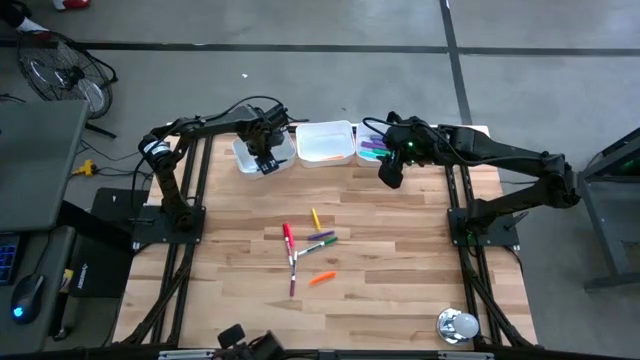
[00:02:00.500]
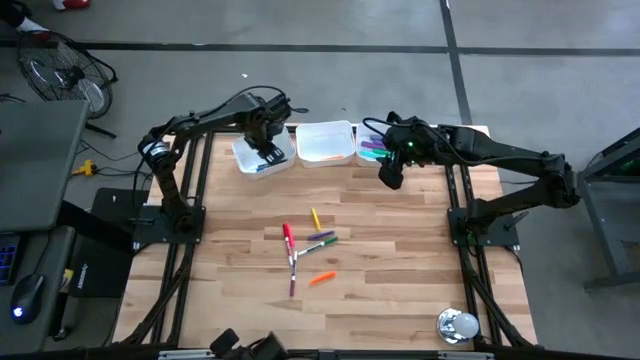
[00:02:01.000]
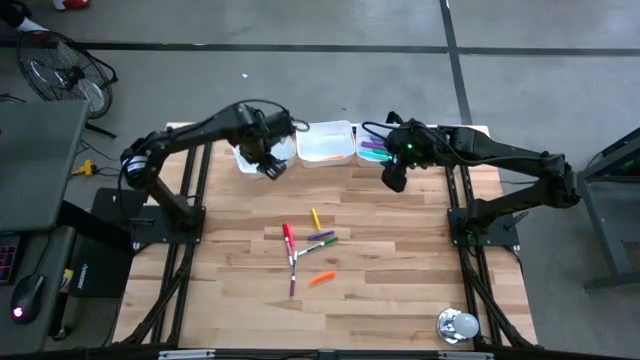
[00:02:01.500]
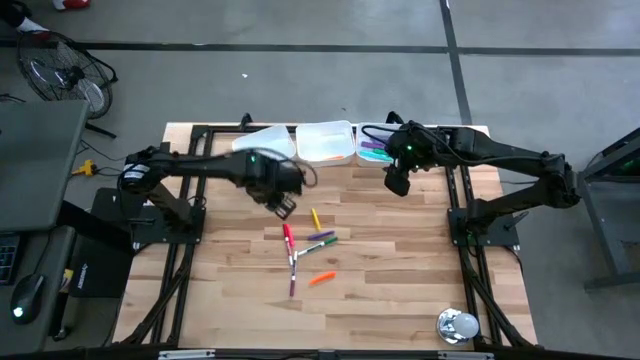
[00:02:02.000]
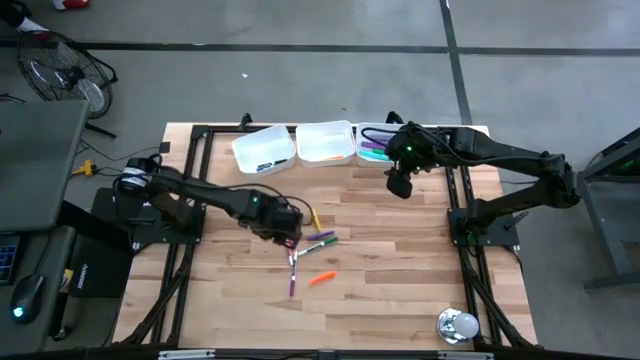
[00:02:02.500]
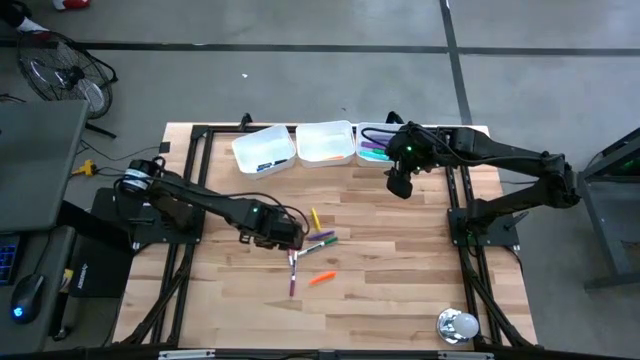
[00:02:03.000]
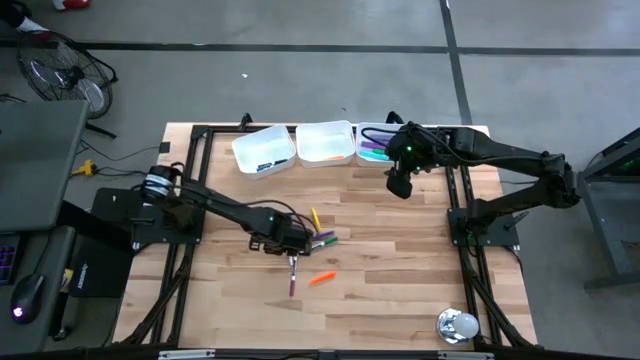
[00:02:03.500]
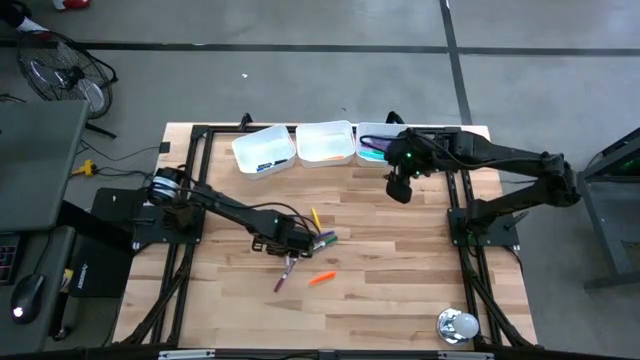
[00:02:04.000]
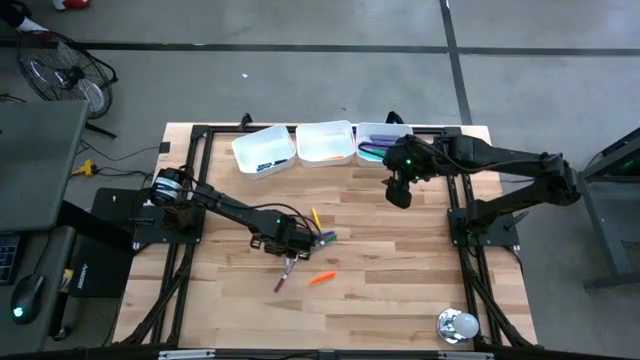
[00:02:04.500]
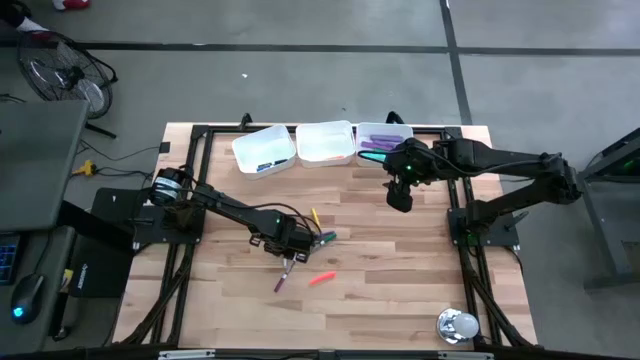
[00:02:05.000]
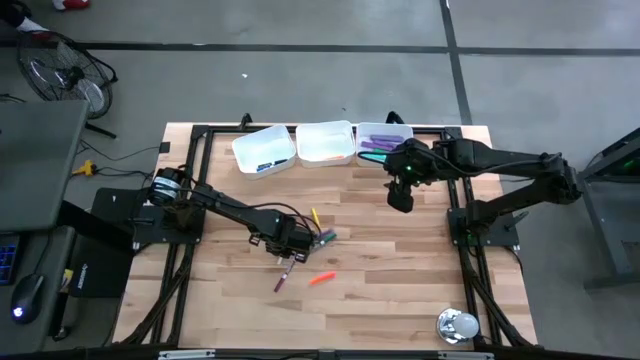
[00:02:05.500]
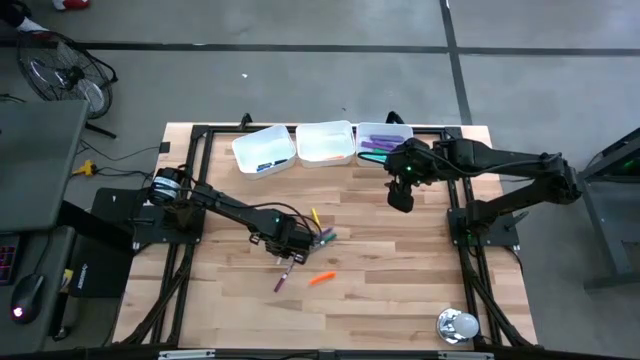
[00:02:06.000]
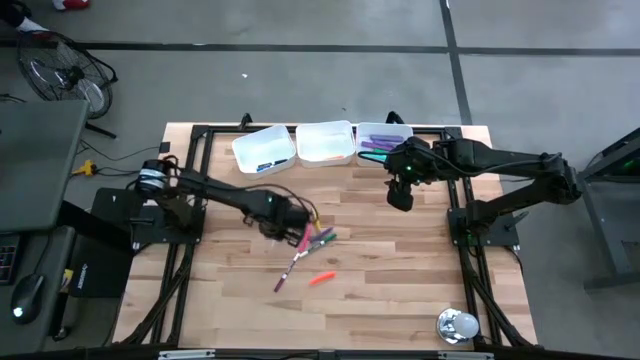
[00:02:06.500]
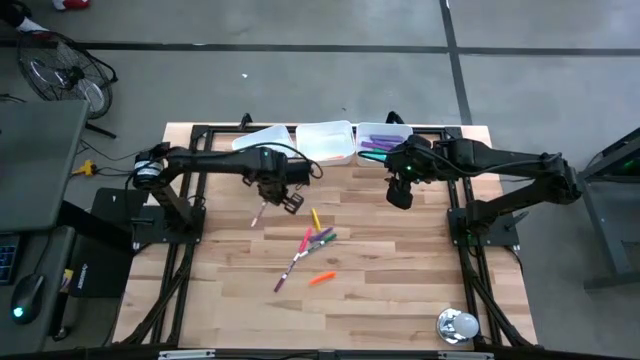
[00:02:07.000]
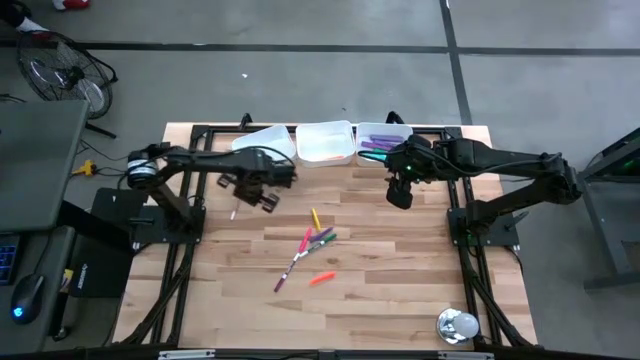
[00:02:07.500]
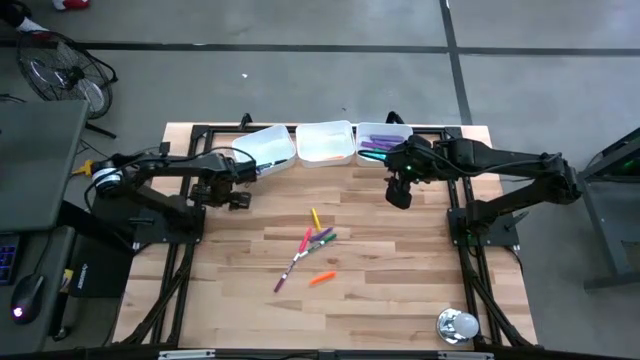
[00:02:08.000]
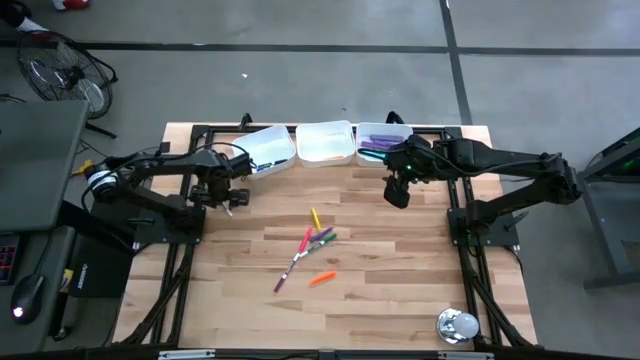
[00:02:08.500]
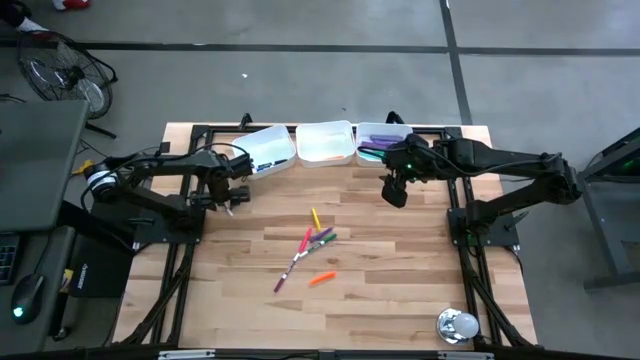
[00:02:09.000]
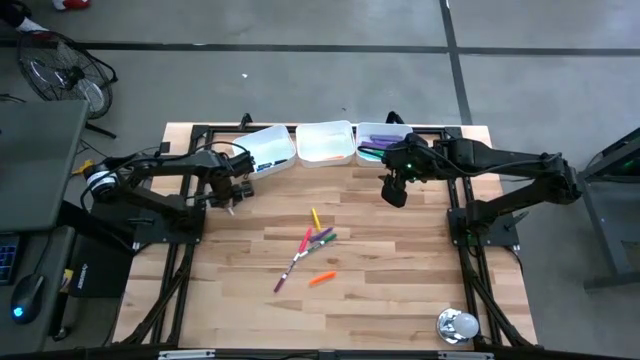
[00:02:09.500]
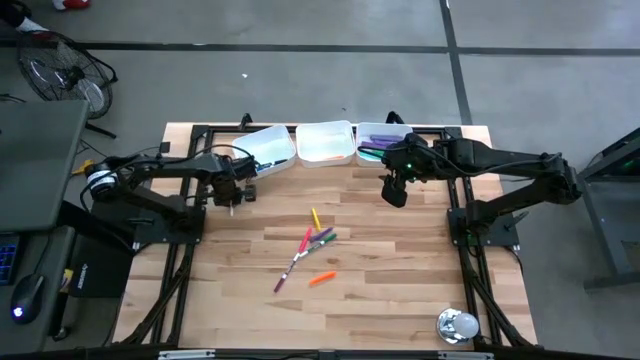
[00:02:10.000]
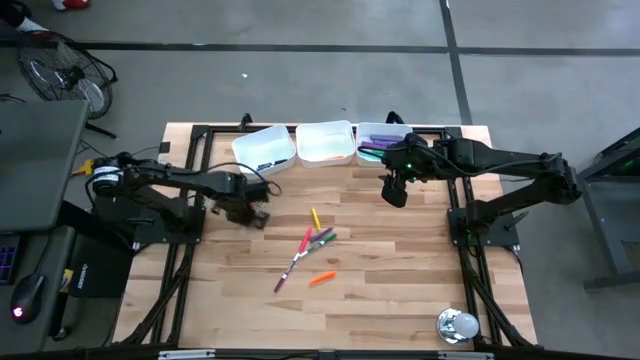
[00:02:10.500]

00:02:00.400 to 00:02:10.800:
Task: Pick & Place Markers
Put the red marker pen into the left white bin

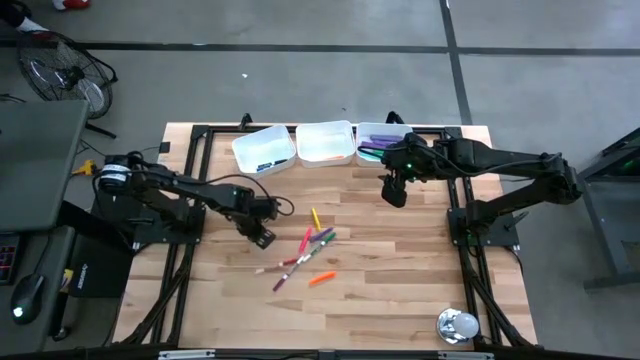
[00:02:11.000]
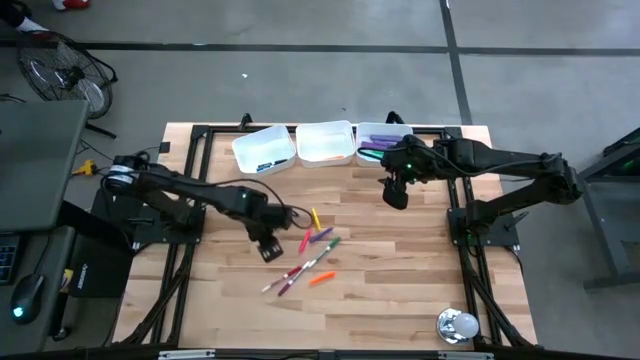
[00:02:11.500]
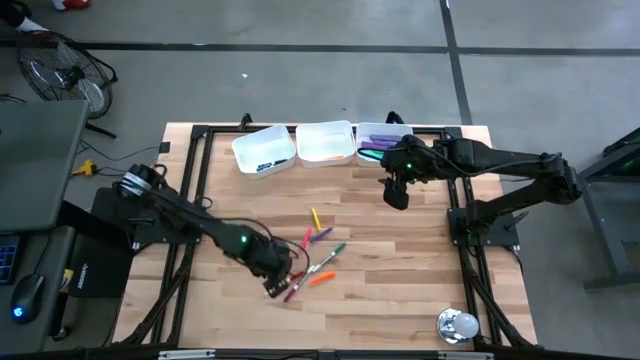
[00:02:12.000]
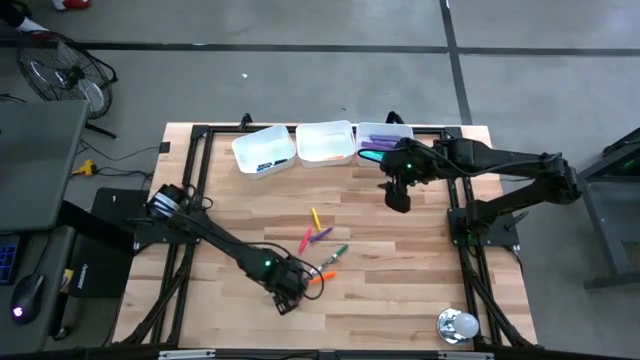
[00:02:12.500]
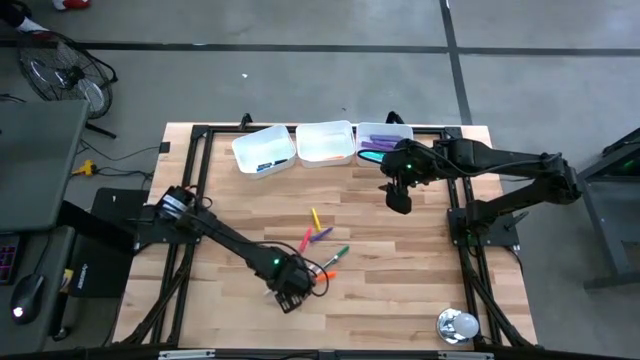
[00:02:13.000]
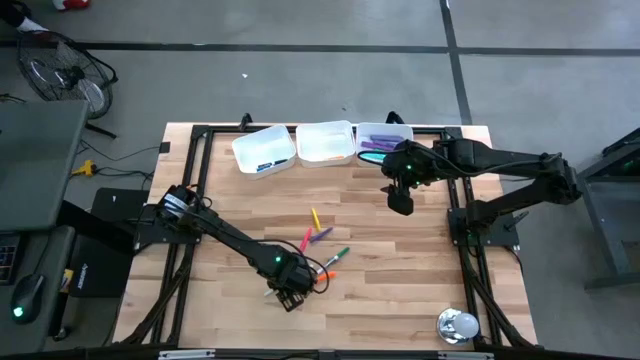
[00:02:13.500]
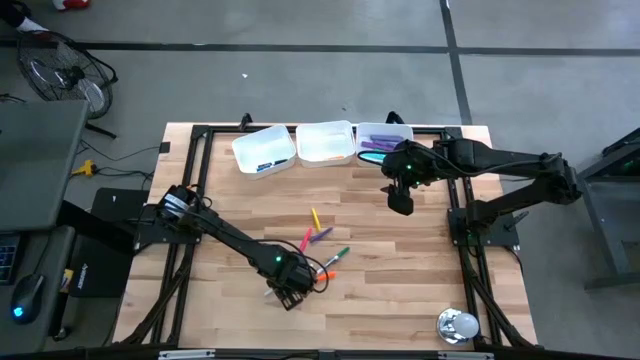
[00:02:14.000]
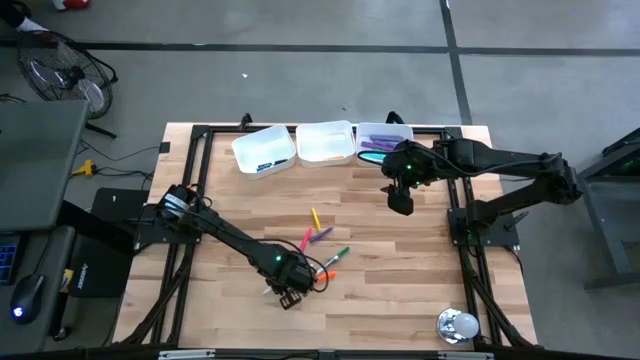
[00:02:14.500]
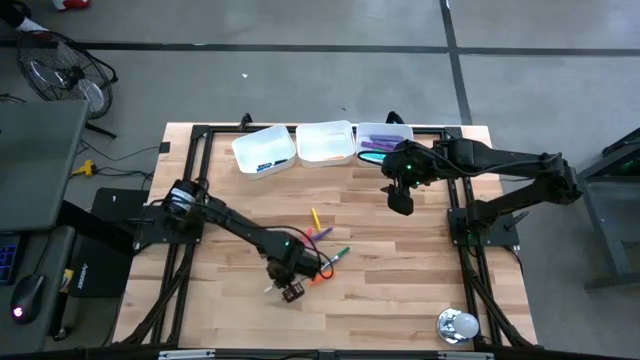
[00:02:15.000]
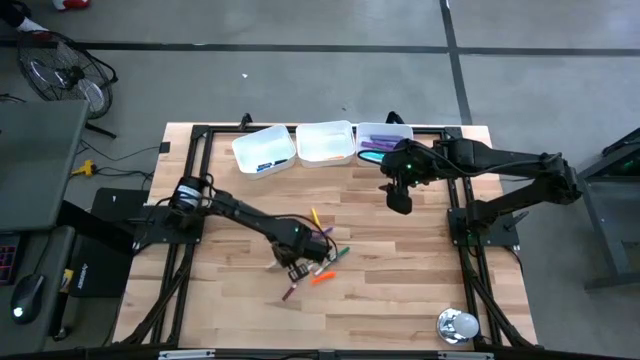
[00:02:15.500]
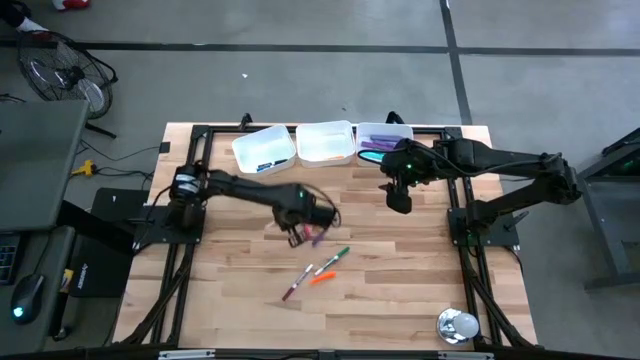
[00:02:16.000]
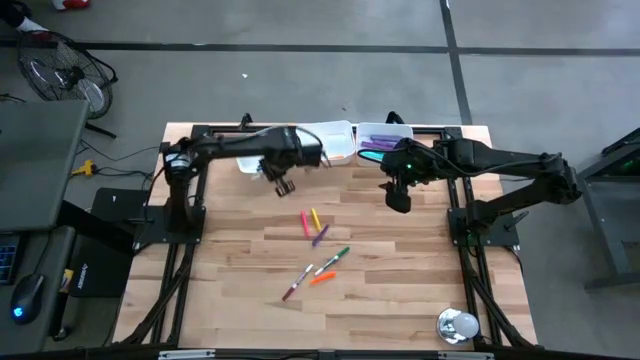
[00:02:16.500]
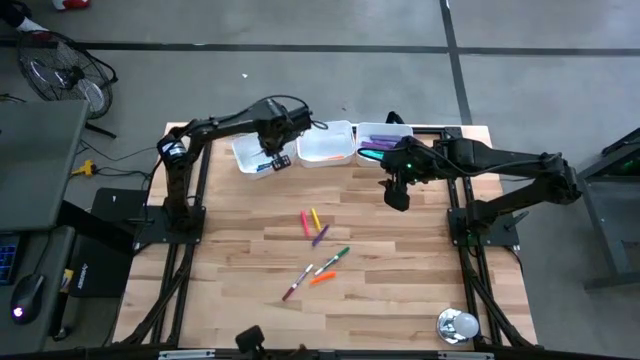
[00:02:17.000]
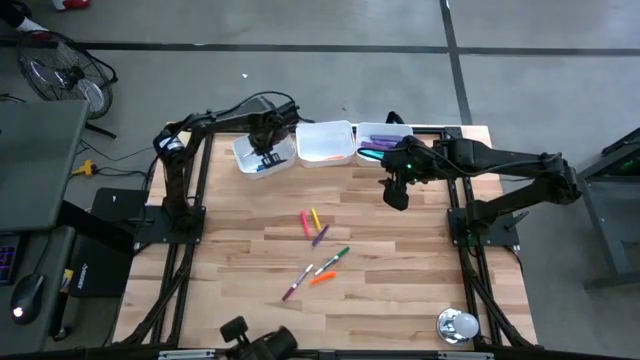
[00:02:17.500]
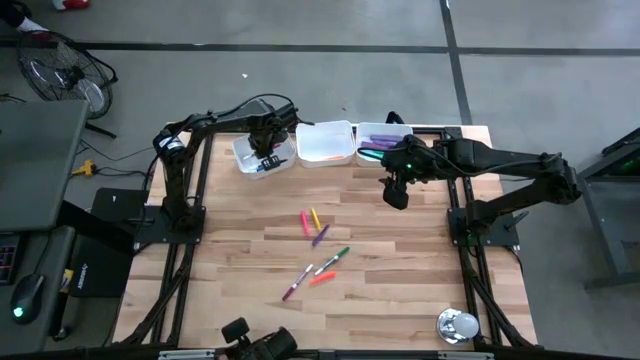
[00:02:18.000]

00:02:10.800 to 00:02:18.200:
Put the red marker pen into the left white bin

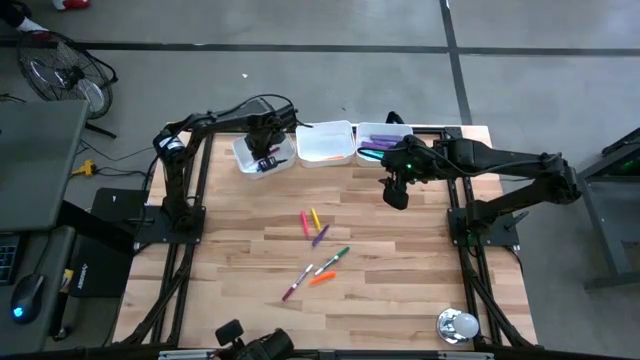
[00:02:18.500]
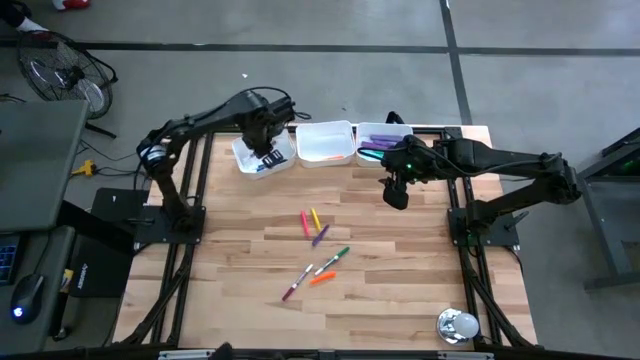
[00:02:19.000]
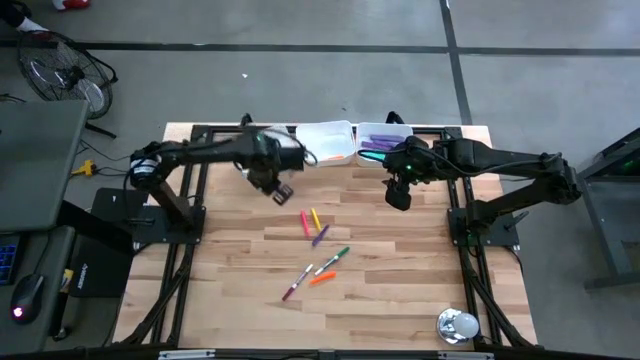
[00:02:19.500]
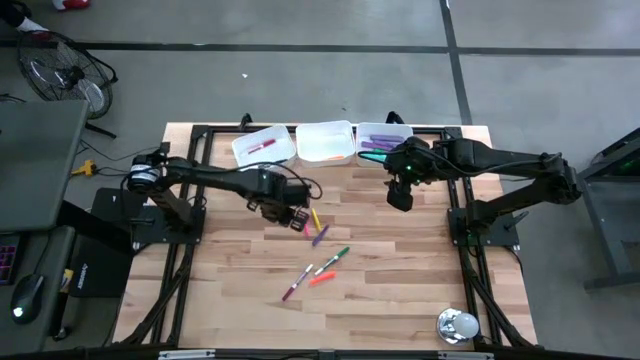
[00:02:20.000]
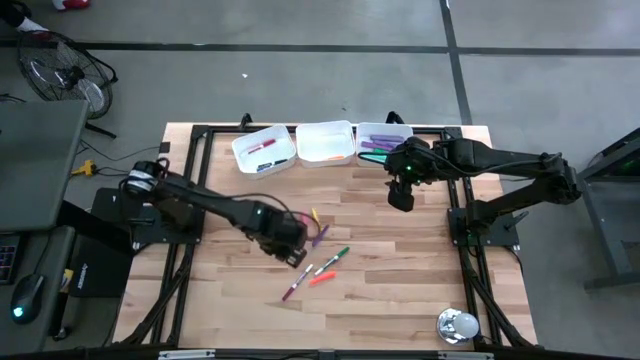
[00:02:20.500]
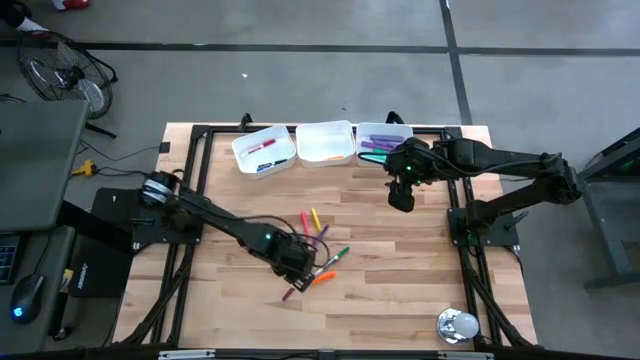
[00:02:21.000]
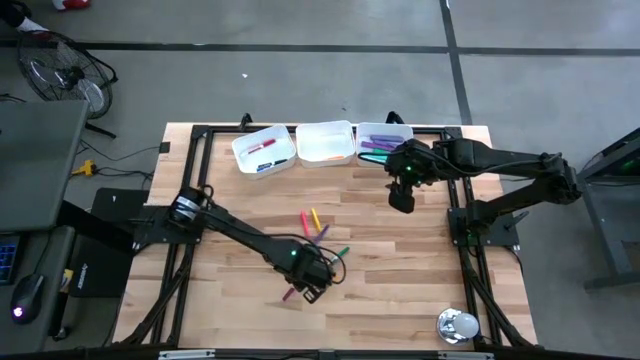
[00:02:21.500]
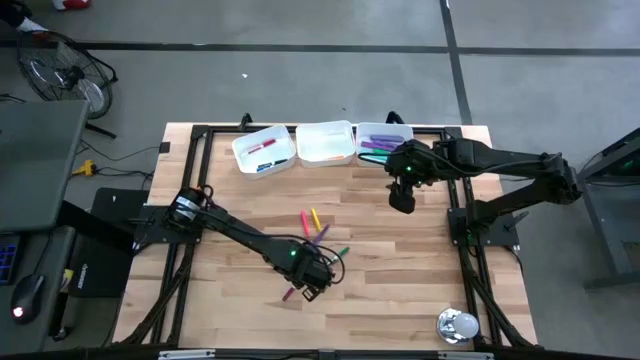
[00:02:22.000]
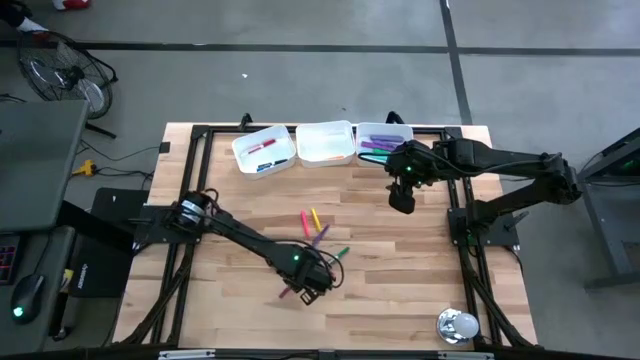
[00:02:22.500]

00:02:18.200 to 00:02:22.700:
Put the pink marker pen into the left white bin
